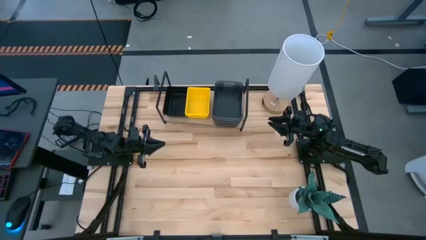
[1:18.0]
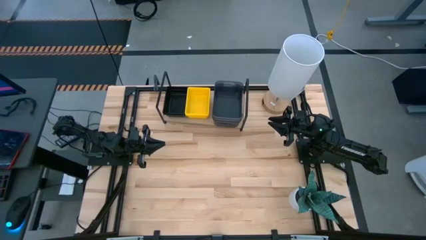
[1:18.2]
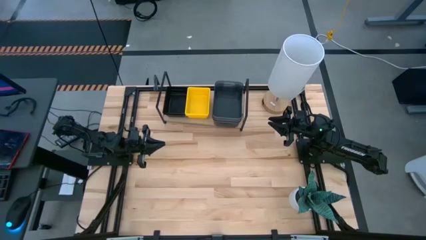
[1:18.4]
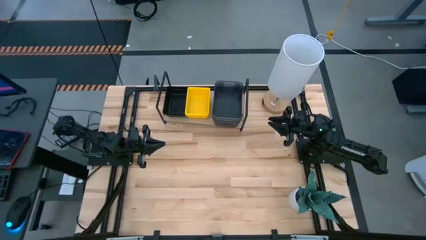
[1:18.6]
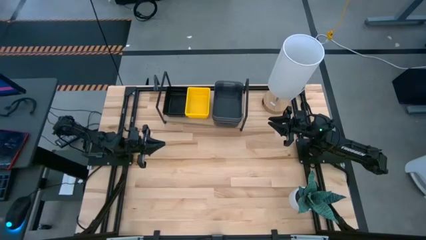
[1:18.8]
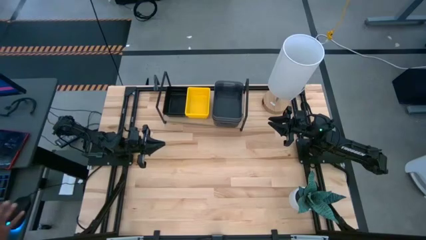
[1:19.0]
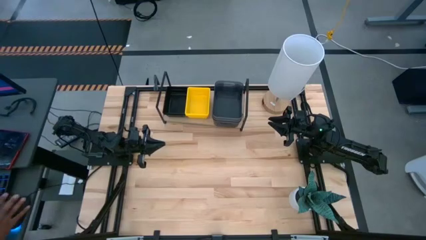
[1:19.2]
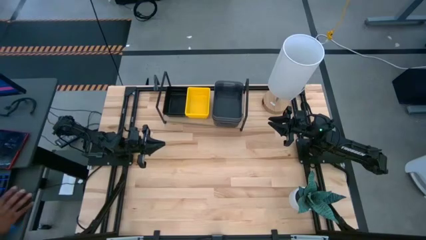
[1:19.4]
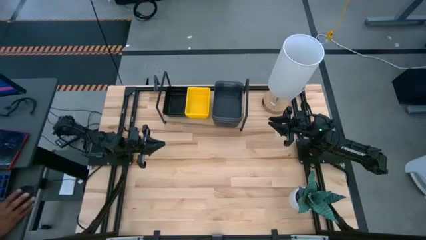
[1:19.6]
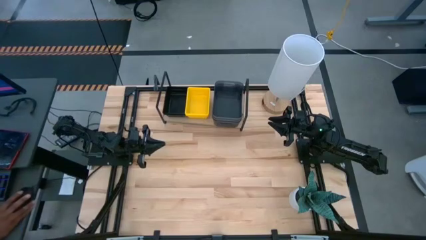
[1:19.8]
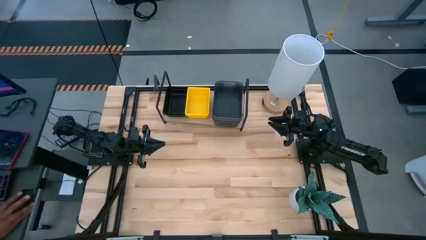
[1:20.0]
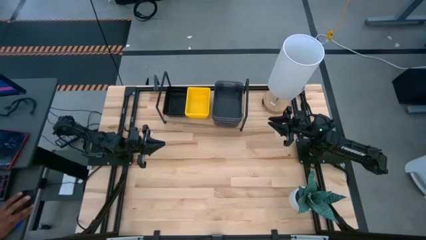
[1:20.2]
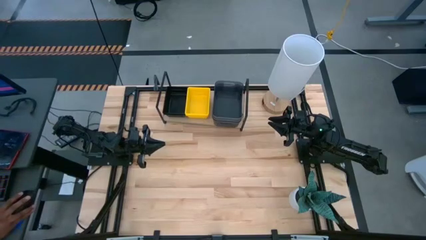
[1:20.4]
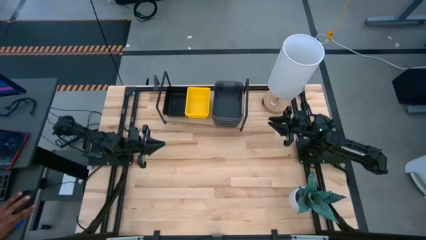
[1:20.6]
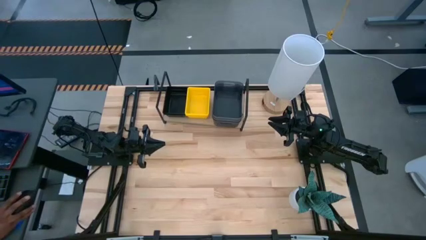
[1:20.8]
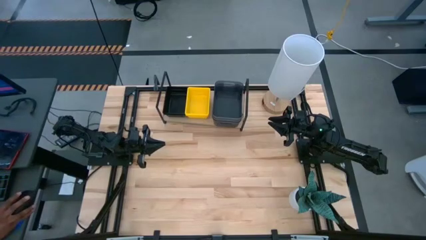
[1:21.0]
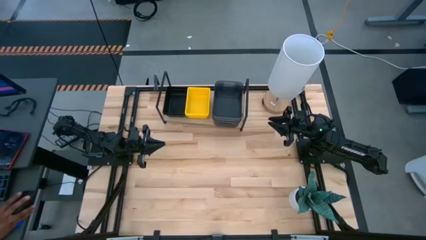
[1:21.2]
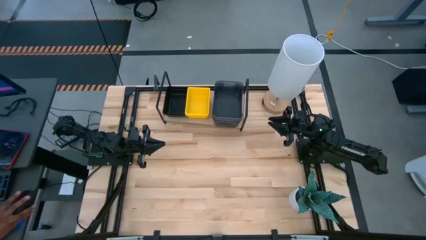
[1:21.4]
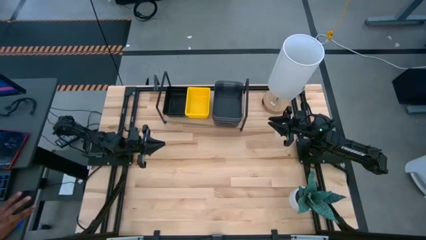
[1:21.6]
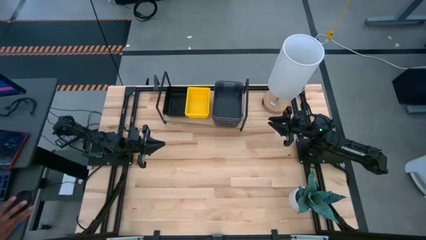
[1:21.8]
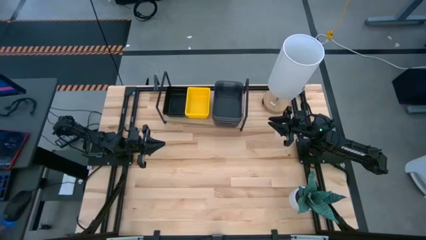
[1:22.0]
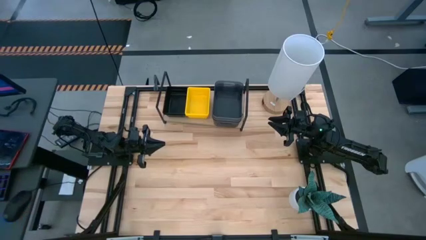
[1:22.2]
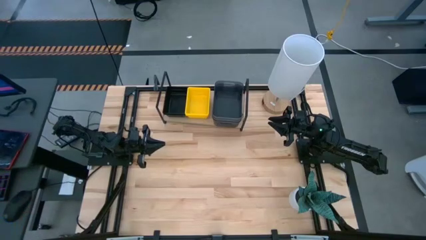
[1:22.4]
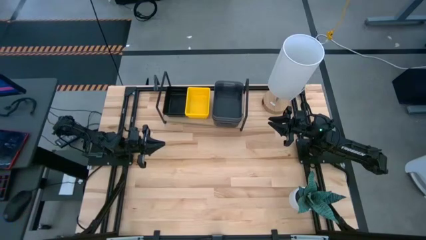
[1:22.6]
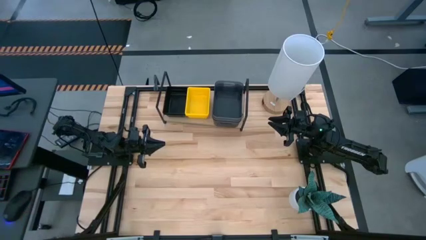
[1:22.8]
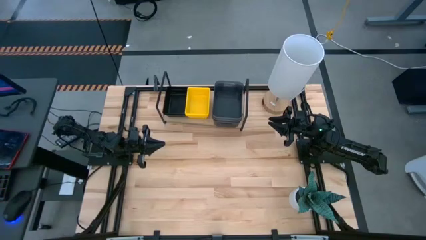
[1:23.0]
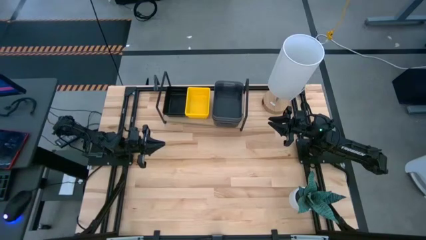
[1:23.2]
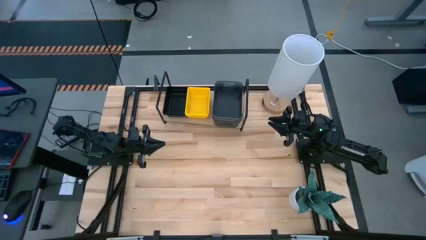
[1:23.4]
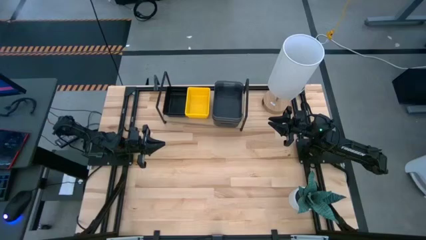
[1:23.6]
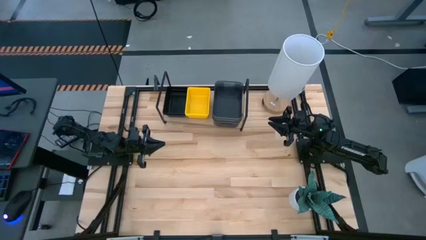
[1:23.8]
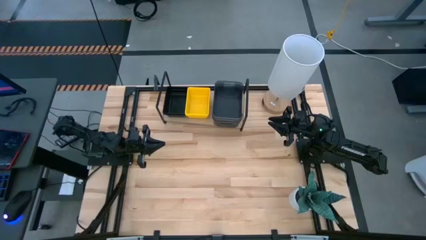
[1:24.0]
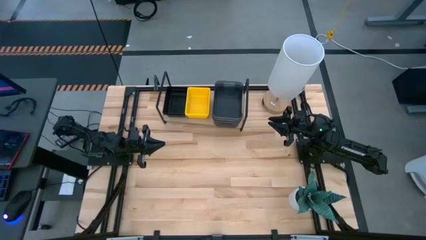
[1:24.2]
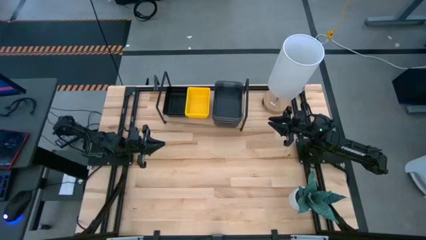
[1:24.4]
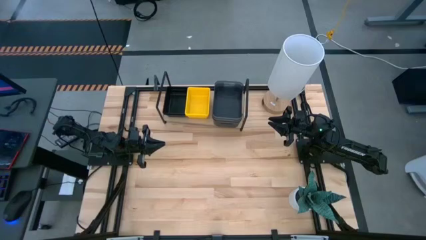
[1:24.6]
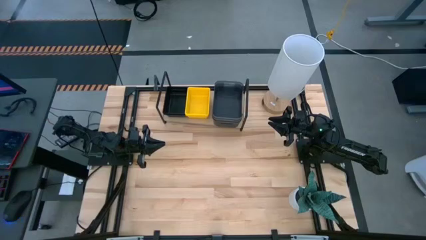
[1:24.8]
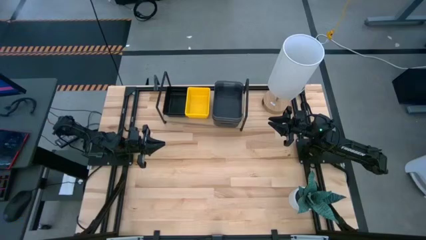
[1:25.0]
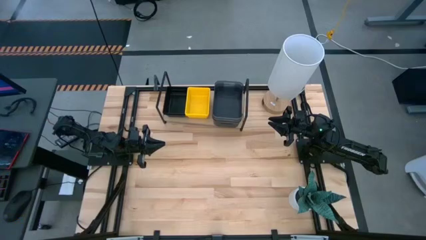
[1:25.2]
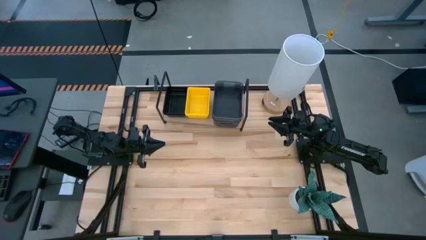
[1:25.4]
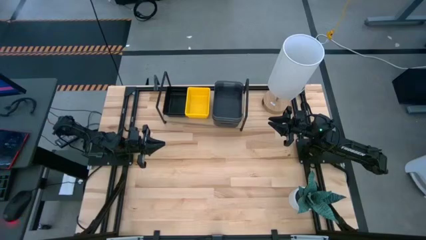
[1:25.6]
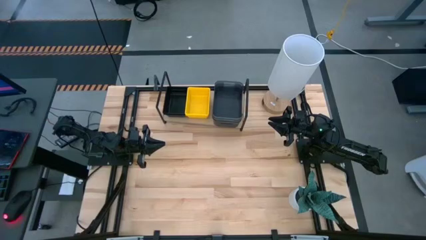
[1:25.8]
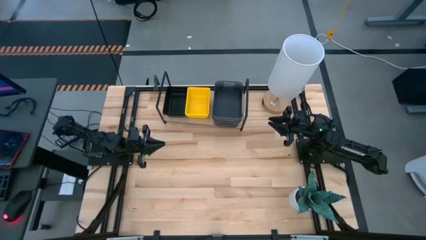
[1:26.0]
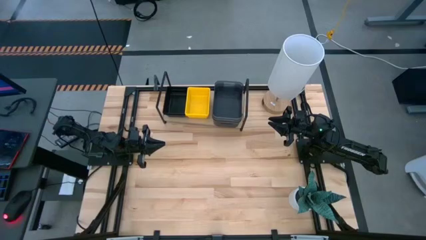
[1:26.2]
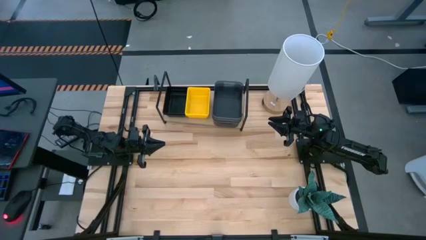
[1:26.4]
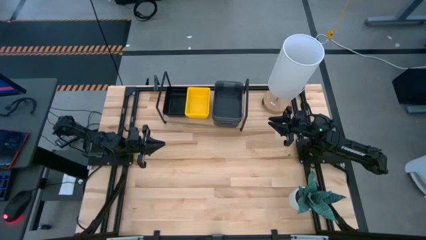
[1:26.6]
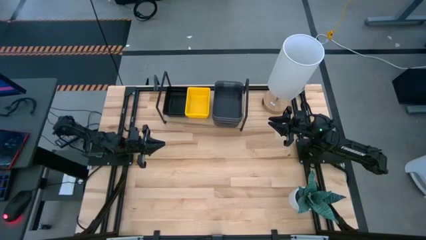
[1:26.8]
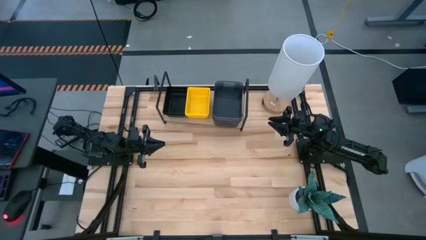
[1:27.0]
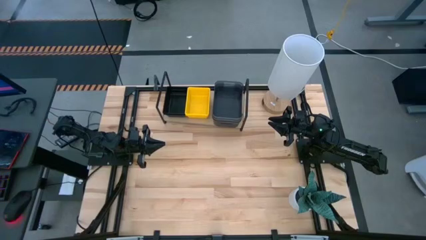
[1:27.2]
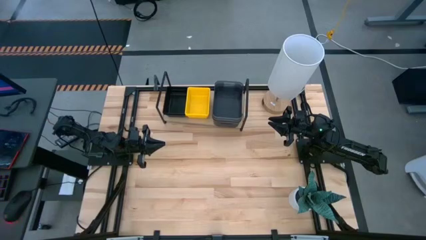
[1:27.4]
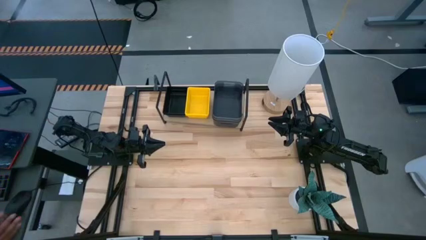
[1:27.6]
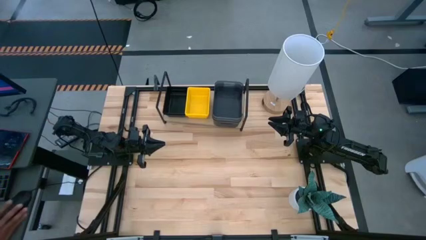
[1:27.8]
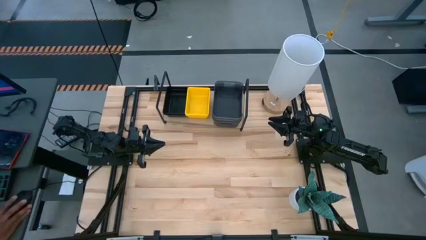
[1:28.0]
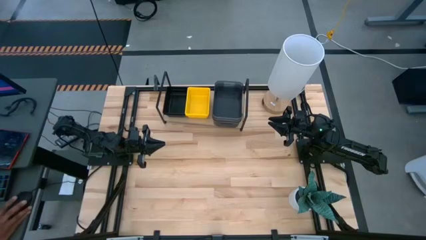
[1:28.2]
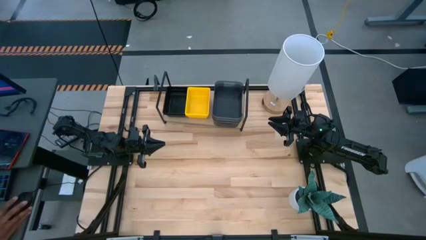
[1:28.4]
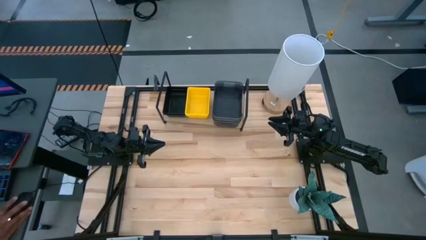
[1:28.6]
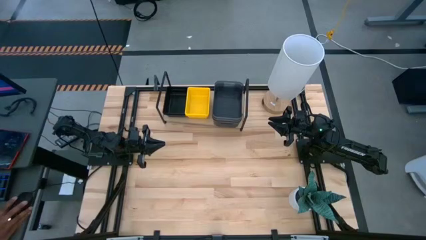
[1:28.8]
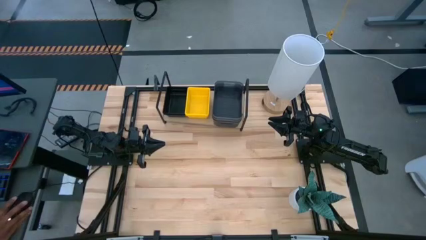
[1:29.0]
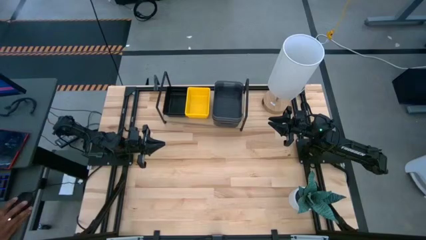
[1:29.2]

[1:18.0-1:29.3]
Task: Stack baskets on shelf by color
Return to Home Position

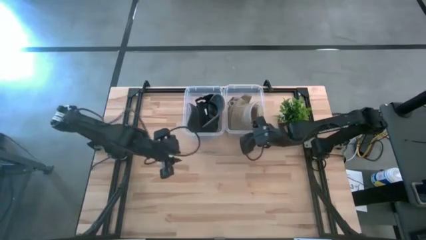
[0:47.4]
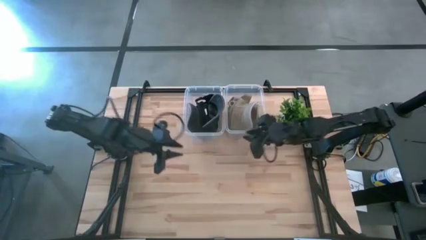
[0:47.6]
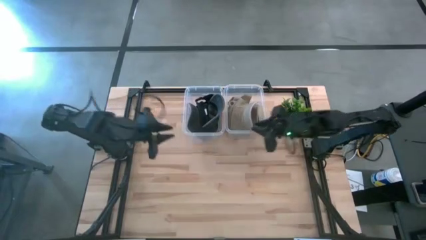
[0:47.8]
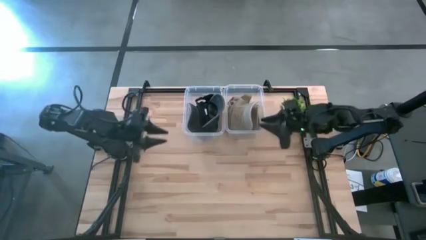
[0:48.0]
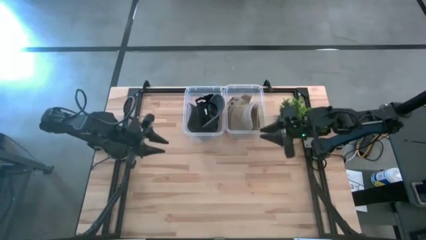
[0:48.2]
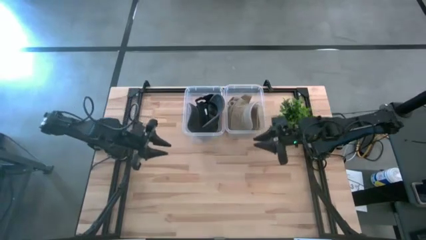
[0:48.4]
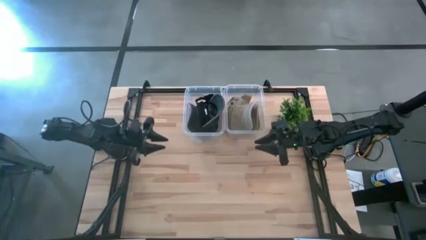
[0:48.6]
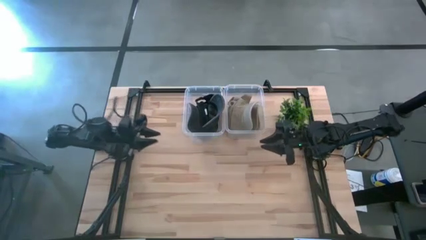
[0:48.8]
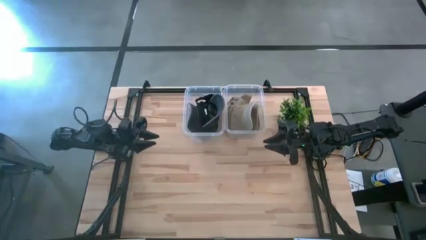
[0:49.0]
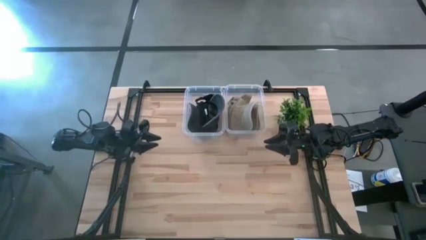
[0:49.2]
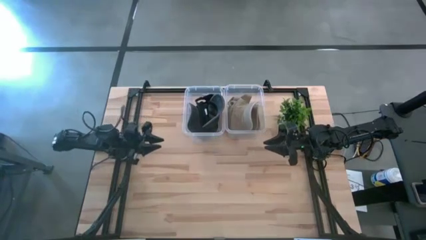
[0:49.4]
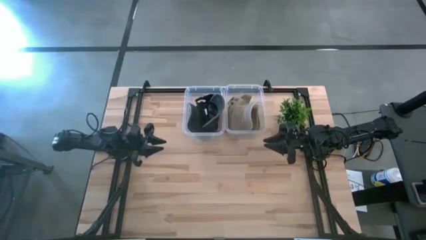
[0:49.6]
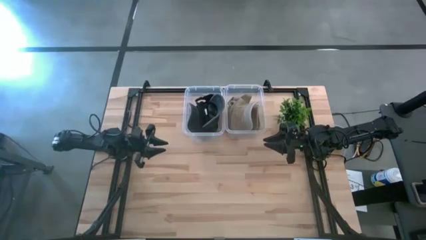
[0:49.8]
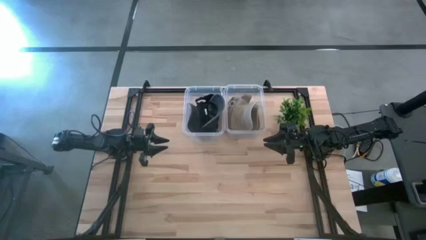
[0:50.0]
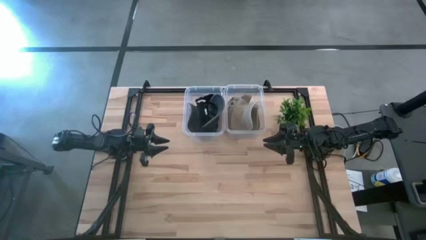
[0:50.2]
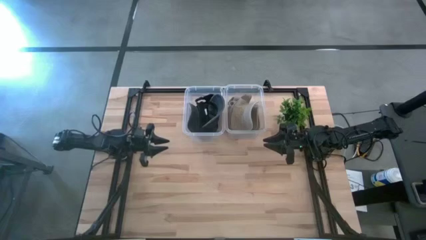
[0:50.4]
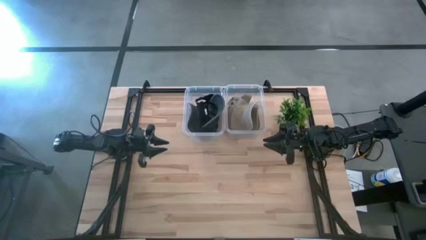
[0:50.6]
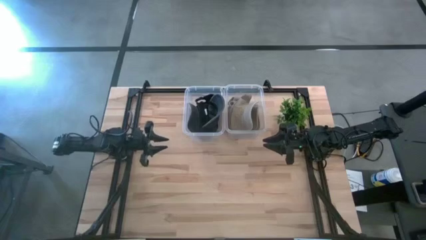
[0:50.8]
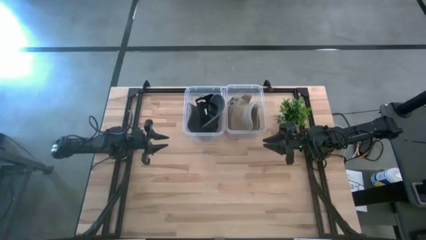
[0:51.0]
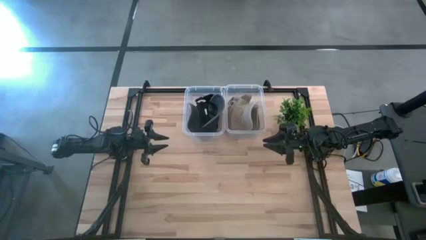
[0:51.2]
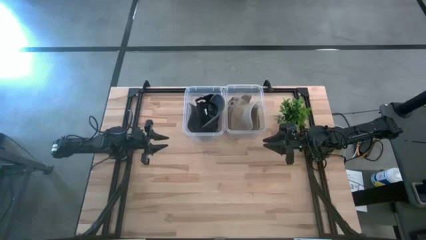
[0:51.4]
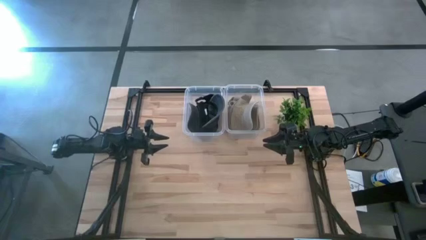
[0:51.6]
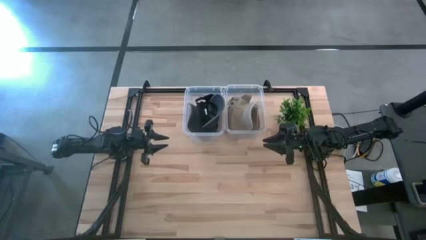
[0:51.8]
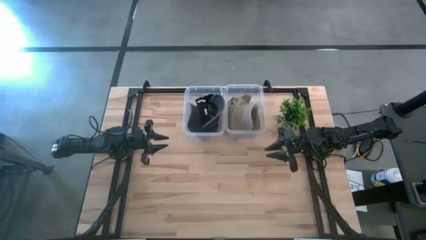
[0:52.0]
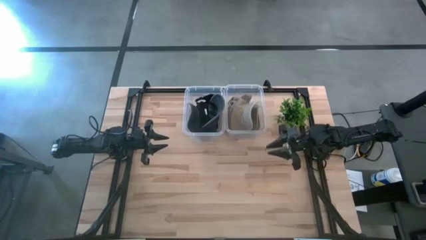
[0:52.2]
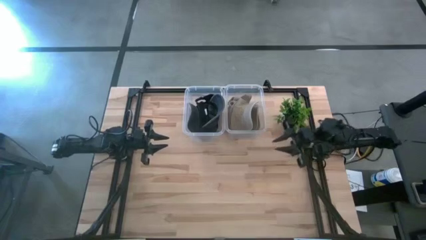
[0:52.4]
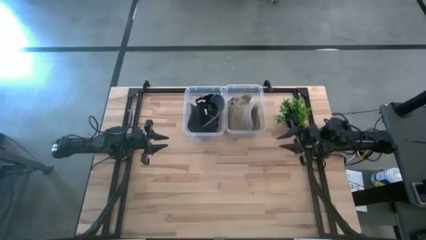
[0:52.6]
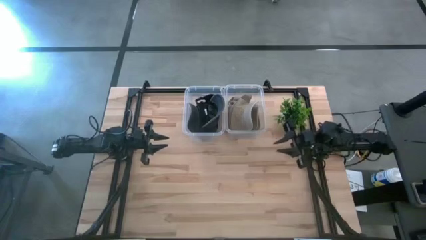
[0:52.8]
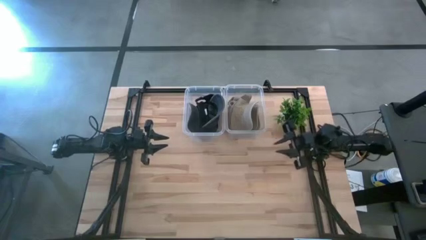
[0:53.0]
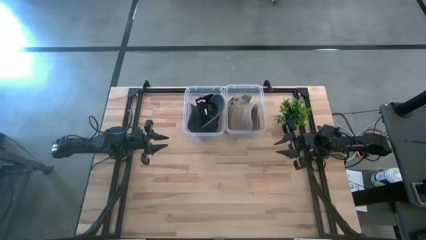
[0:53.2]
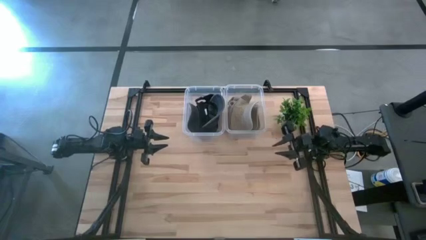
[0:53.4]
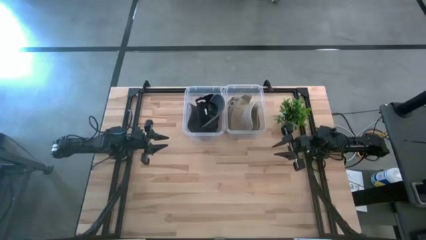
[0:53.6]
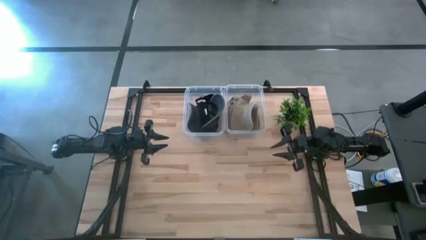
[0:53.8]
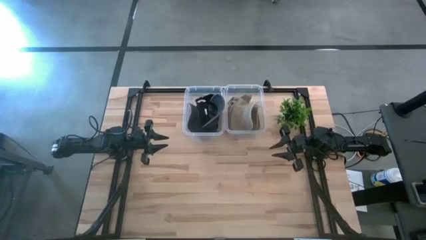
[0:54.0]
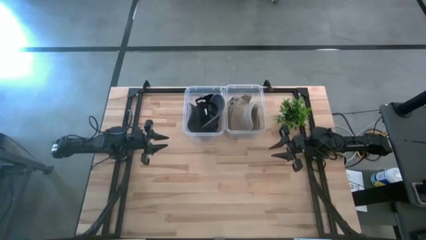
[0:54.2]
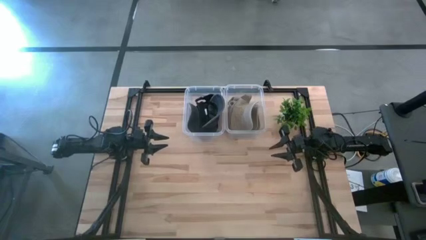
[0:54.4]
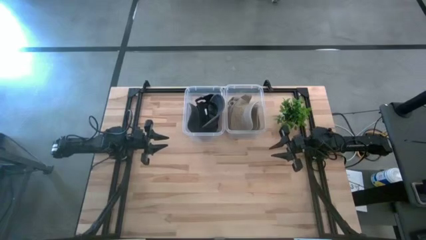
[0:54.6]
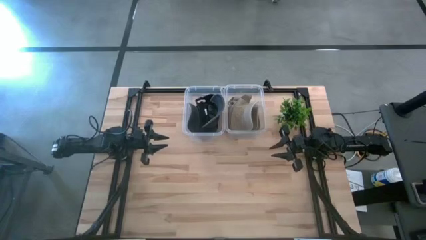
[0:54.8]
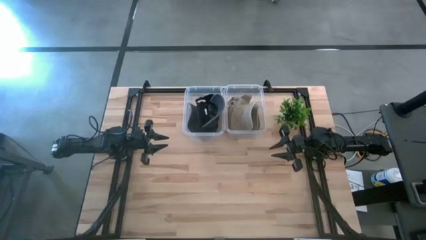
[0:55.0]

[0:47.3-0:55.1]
Task: Pick & Place hat
Return to Home Position
